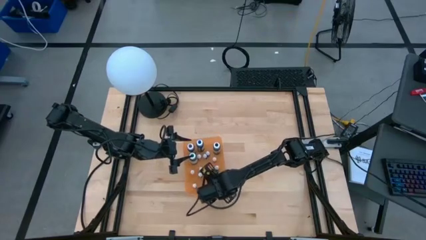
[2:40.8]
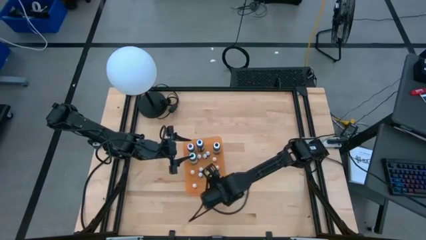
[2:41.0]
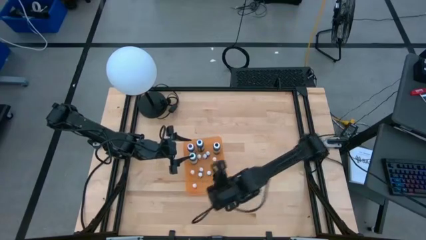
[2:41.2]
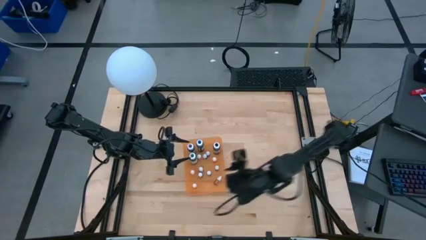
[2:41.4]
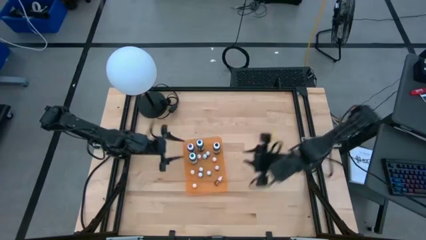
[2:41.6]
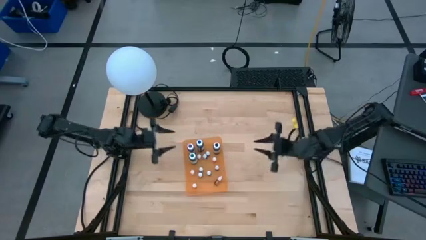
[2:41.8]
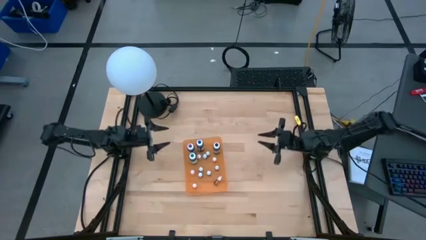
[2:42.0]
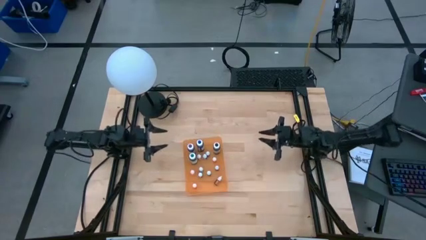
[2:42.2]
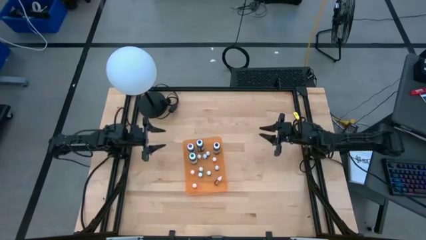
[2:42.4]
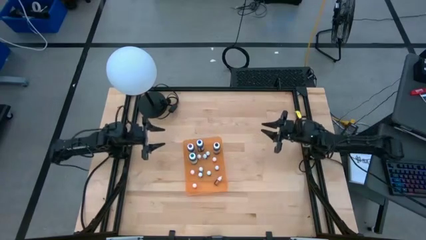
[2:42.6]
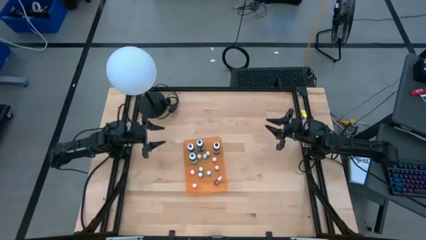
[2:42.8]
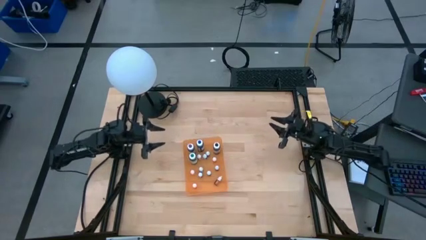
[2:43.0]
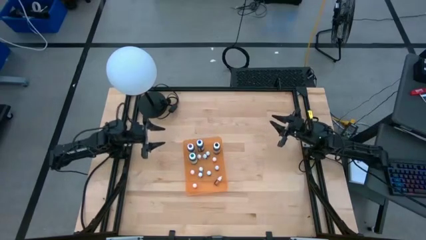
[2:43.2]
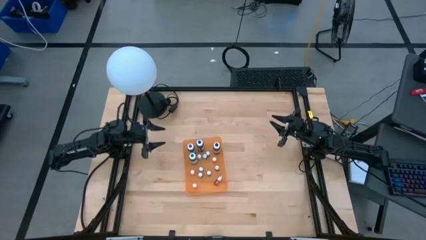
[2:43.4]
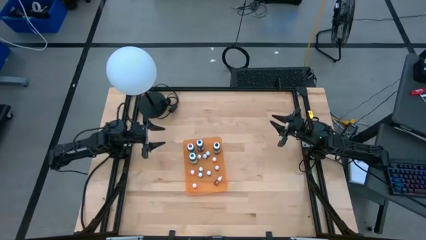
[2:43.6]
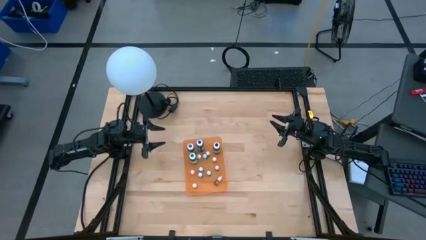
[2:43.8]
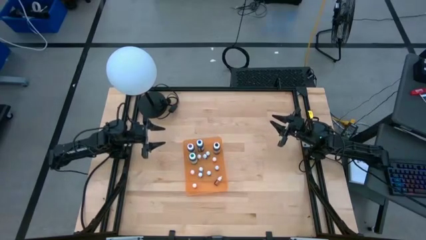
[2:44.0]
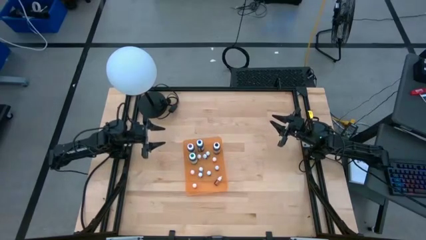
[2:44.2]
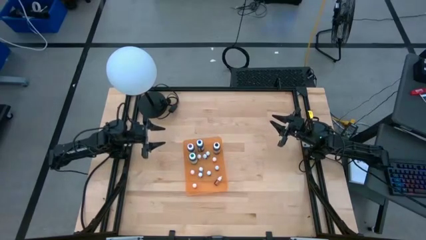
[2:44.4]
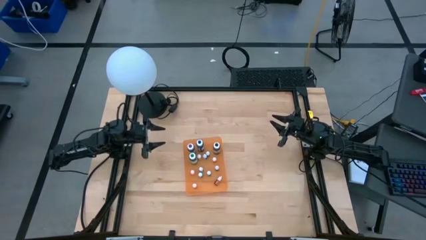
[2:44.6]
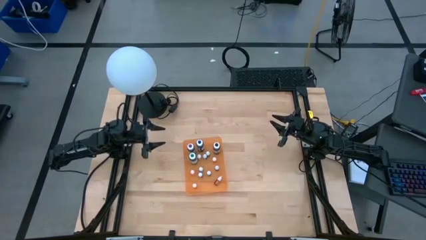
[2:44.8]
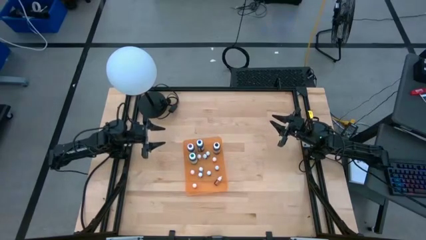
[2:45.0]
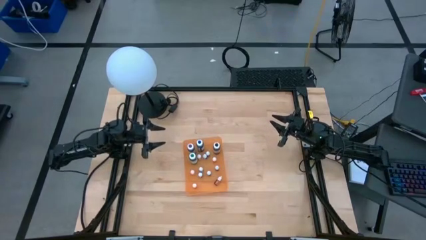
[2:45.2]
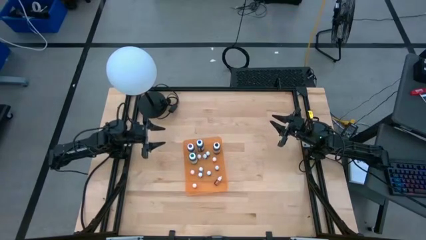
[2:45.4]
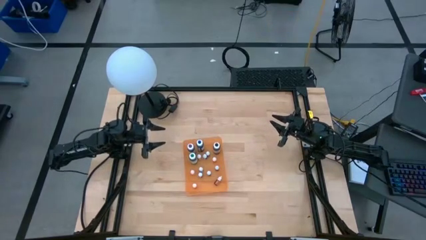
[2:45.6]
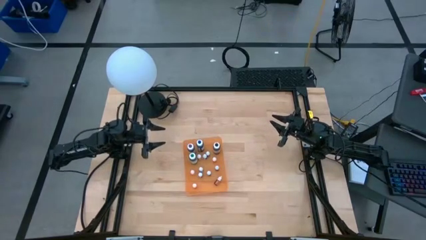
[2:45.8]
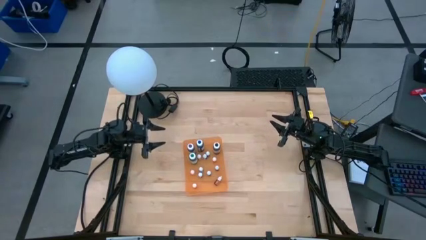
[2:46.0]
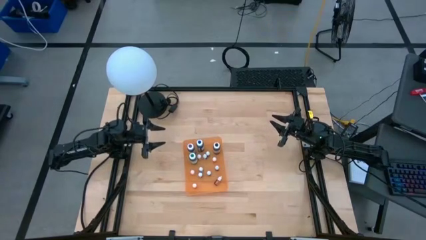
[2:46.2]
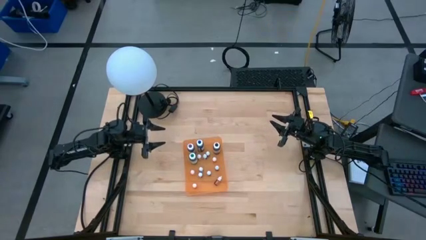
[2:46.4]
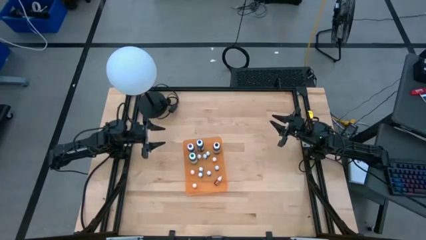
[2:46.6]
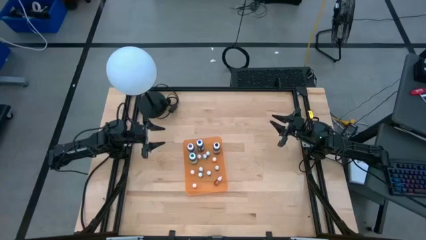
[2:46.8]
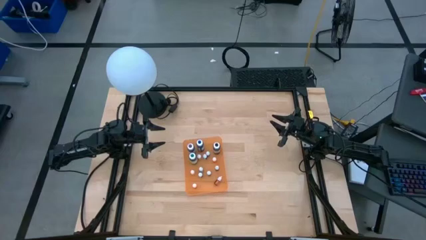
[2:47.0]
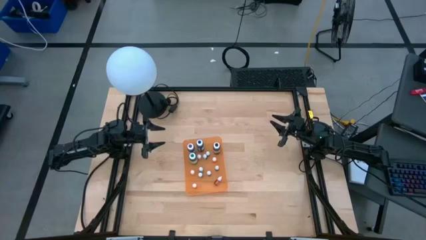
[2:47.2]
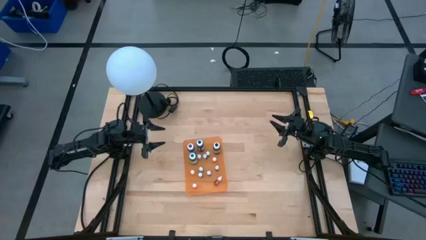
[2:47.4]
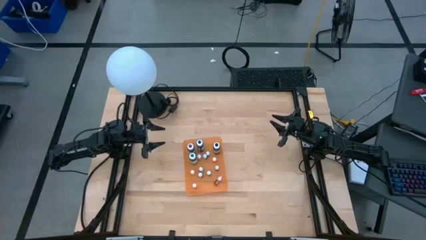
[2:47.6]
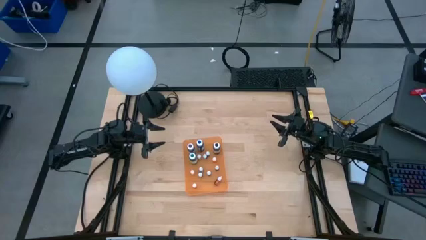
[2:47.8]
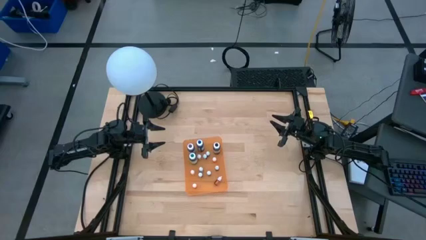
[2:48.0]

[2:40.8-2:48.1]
Task: Pick & Place food coloring
Return to Home Position

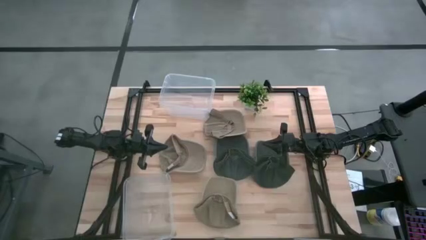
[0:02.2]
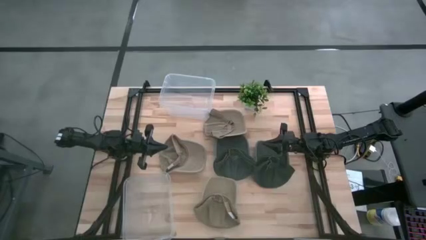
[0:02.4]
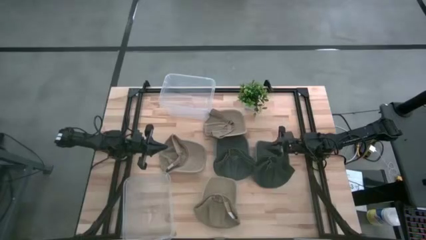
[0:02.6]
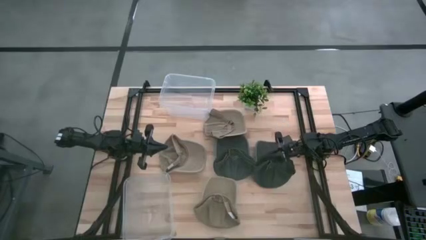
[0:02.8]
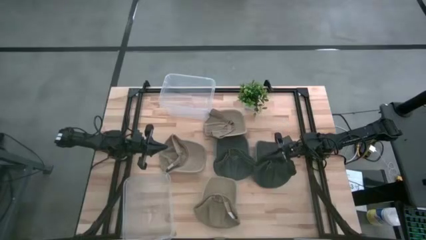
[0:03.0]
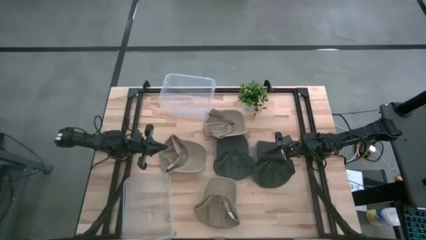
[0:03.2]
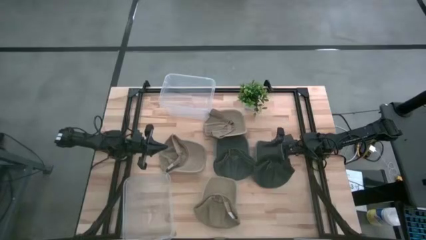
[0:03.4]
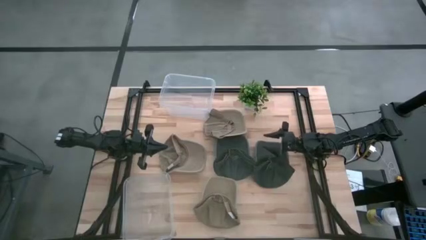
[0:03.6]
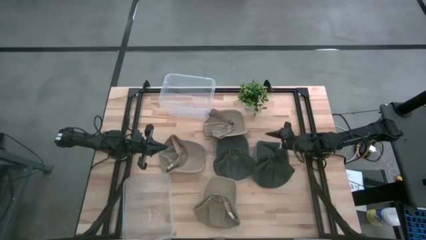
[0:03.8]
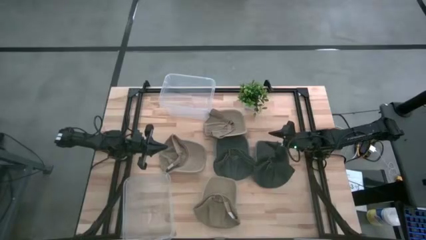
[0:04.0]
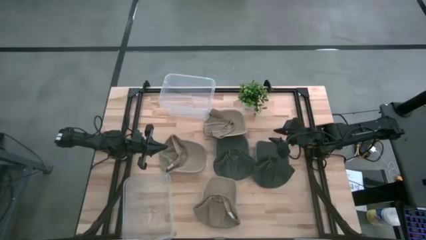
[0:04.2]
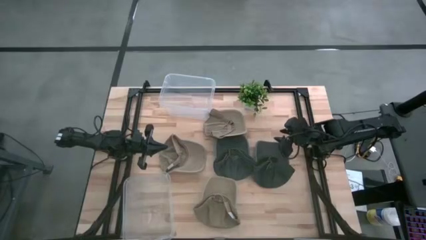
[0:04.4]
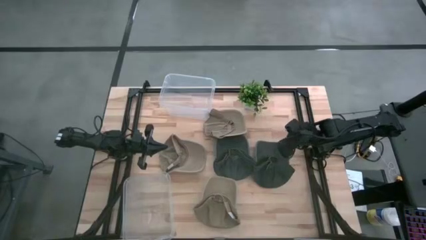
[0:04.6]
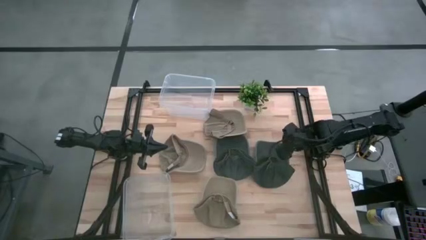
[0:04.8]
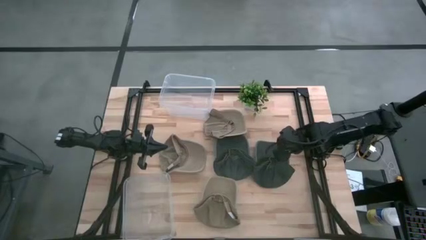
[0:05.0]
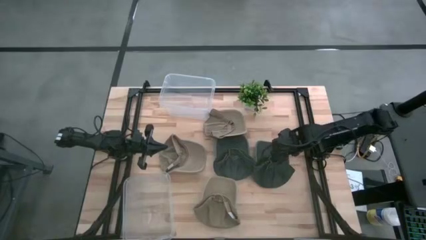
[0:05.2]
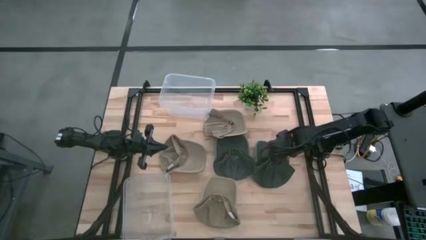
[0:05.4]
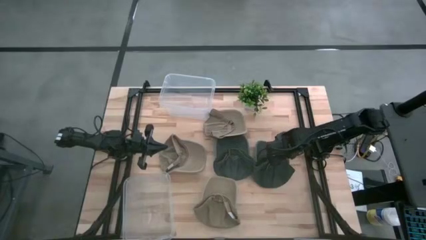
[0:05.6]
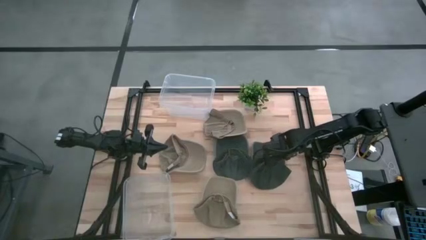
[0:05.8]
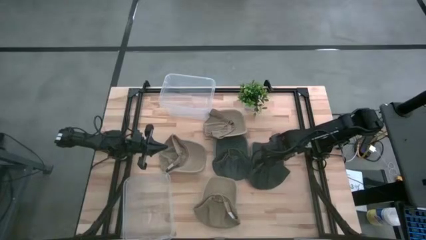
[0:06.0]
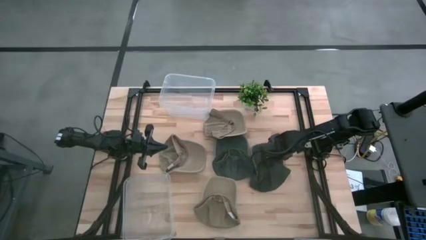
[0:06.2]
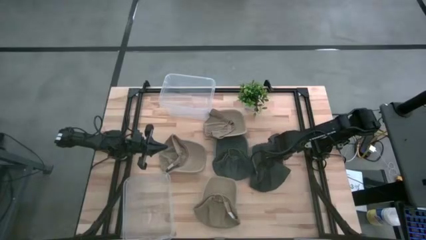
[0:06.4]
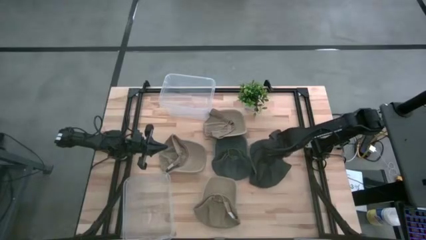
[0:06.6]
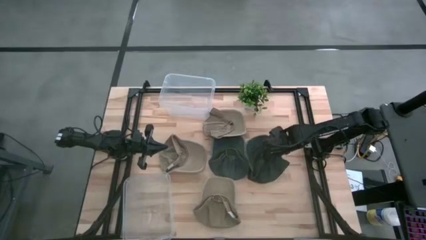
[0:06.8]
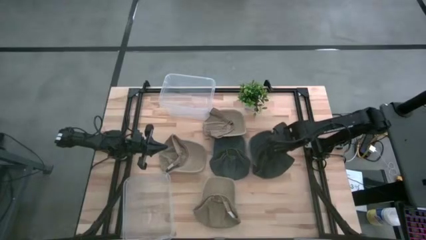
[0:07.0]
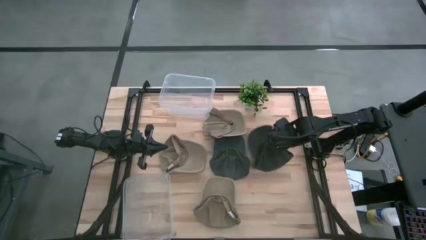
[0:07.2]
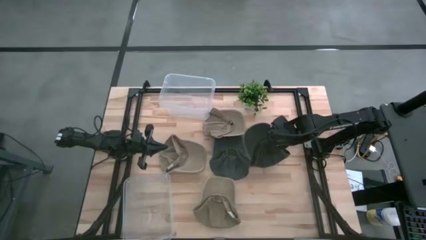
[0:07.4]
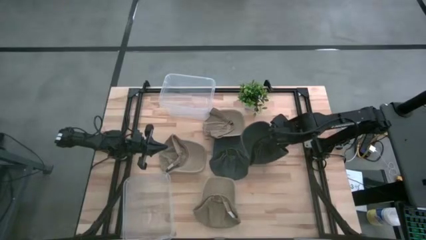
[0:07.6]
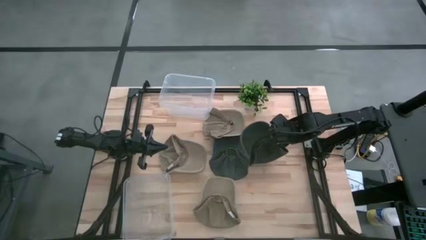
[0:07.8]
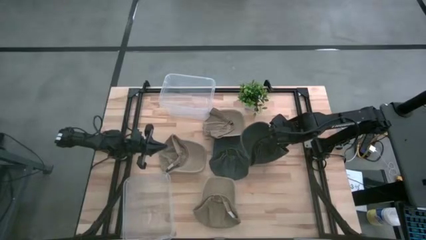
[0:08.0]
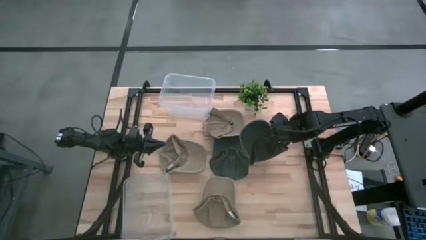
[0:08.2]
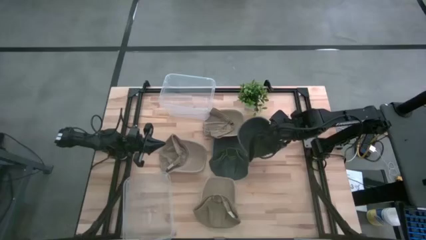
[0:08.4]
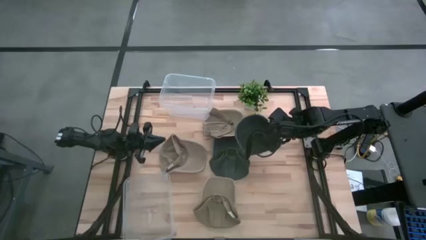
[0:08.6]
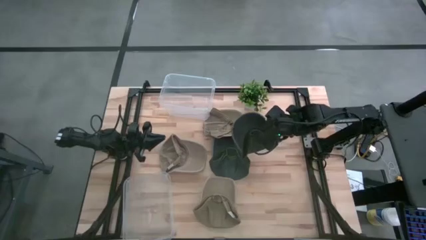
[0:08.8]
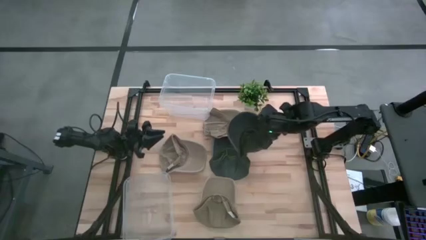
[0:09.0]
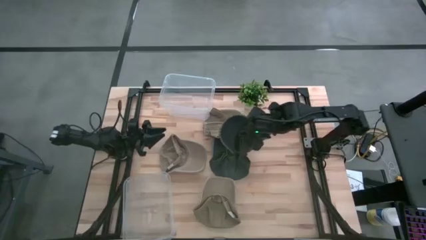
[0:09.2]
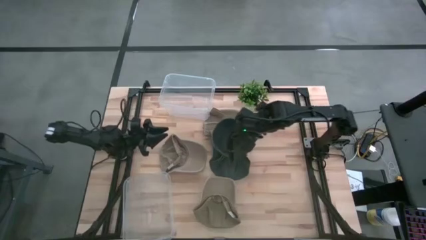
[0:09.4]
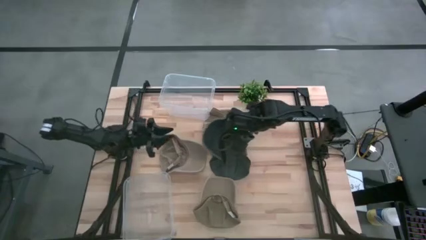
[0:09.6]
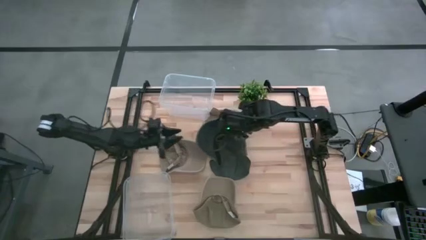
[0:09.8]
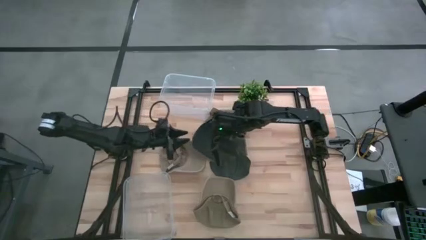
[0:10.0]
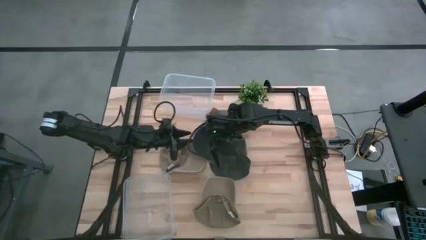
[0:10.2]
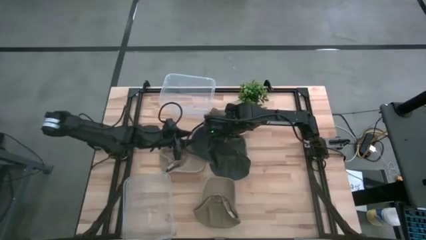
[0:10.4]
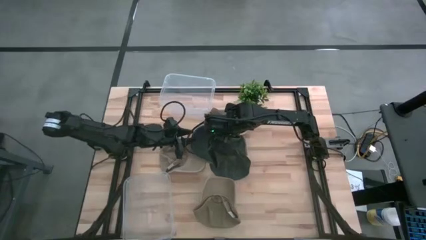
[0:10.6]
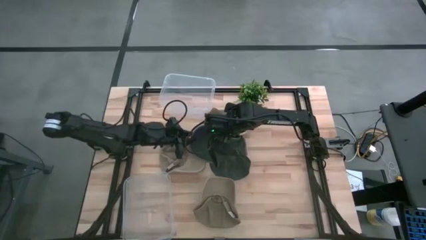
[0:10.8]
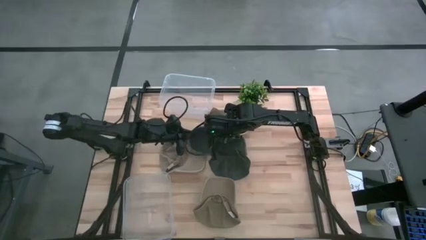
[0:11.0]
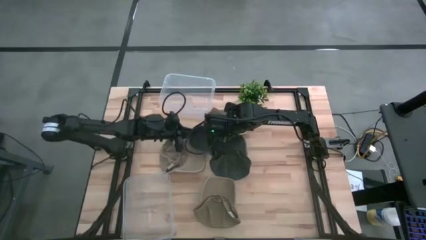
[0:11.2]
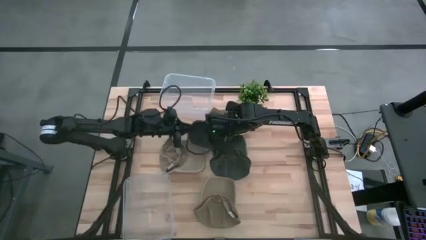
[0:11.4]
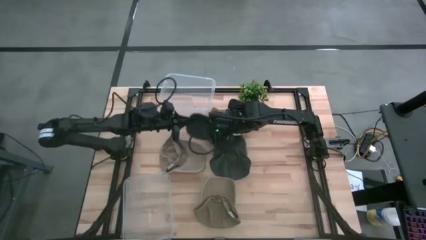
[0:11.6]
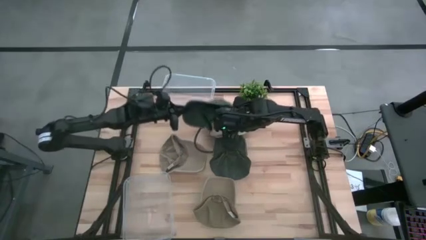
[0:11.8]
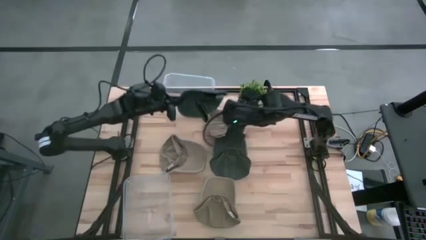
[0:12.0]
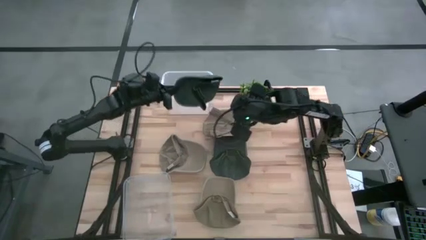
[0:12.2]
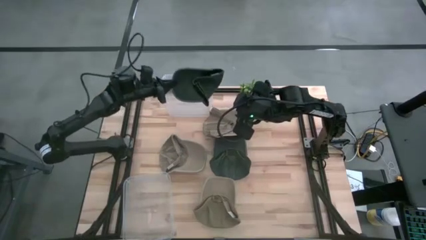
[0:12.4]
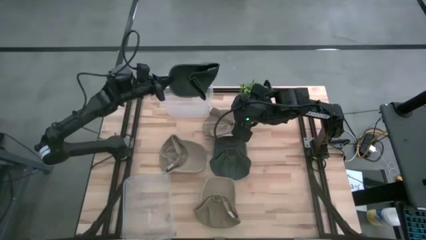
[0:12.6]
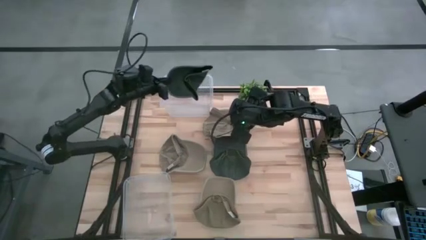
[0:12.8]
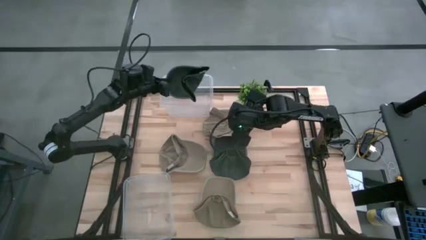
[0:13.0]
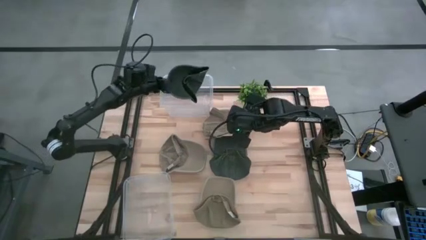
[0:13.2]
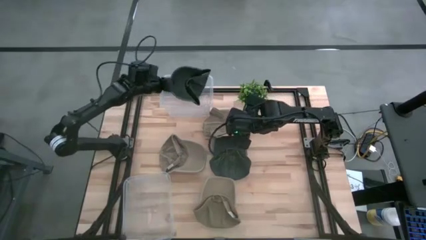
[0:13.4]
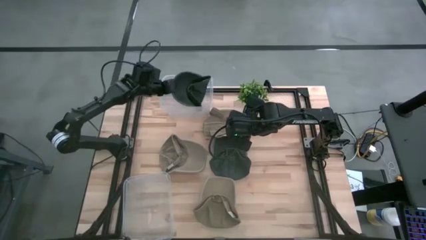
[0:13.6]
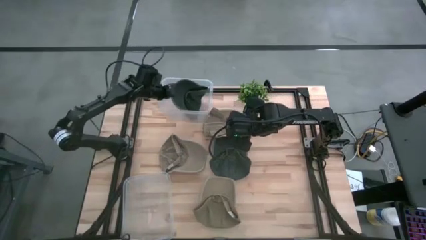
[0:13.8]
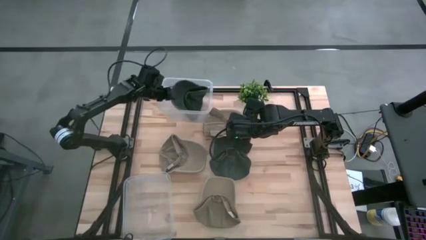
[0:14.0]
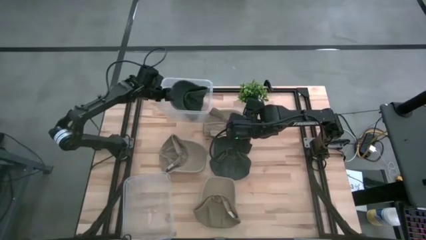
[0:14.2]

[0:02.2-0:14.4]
Task: Pick & Place hat
Put the right black cap in the top transparent bin
